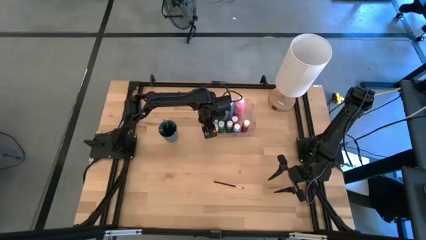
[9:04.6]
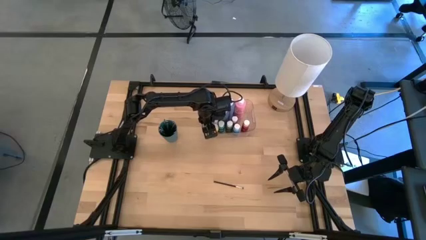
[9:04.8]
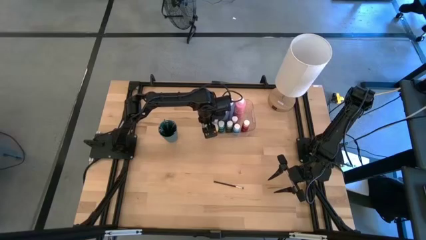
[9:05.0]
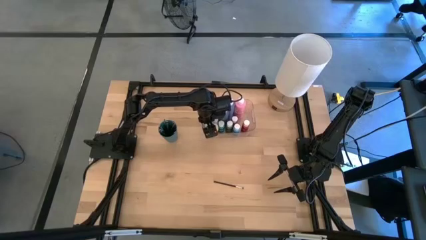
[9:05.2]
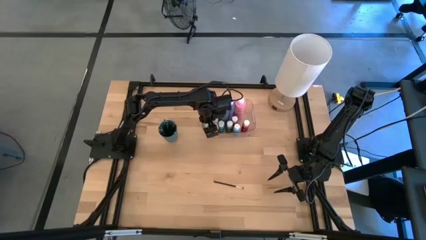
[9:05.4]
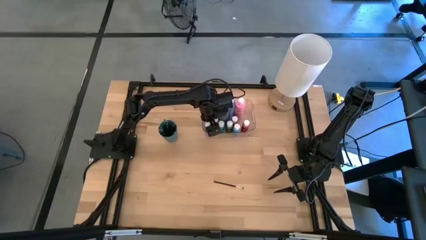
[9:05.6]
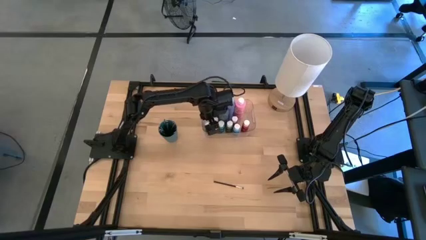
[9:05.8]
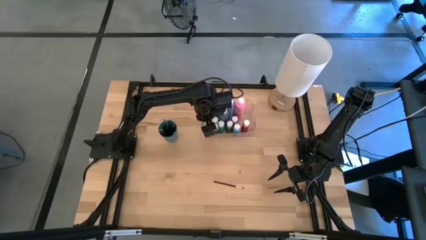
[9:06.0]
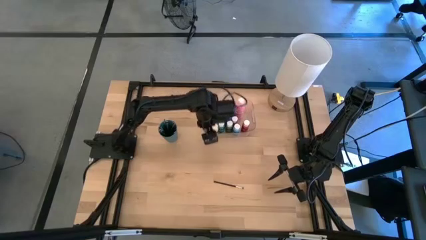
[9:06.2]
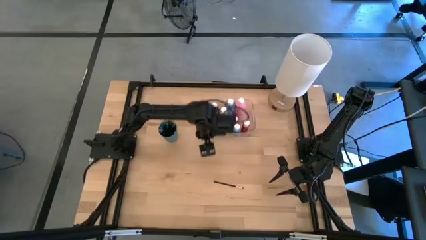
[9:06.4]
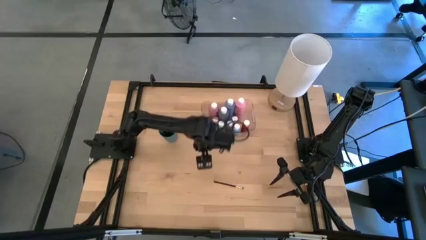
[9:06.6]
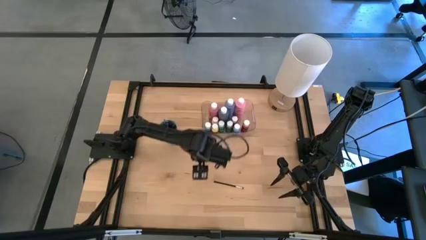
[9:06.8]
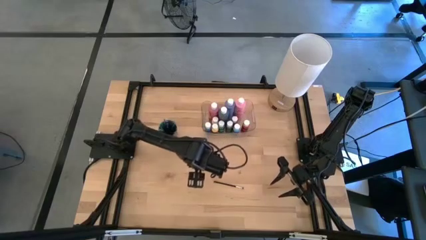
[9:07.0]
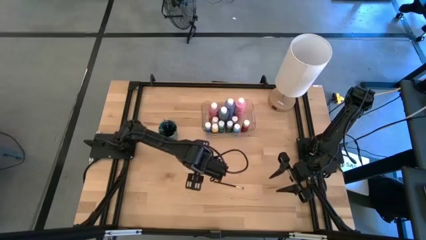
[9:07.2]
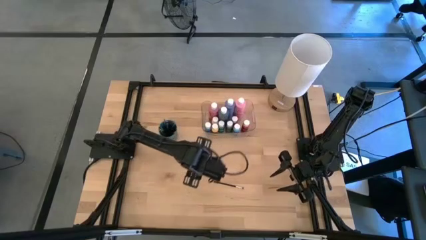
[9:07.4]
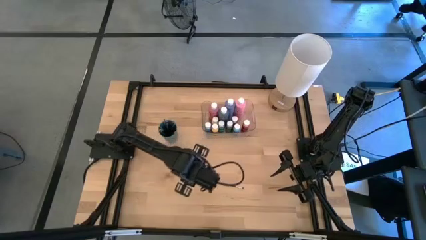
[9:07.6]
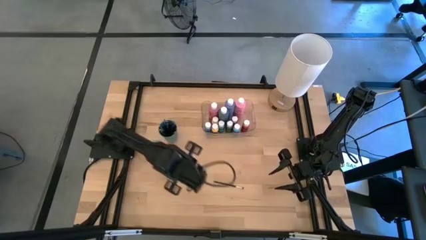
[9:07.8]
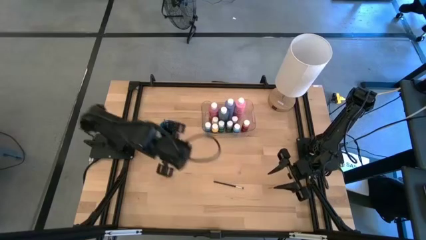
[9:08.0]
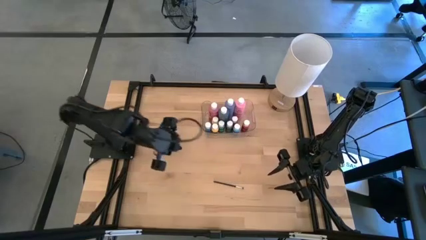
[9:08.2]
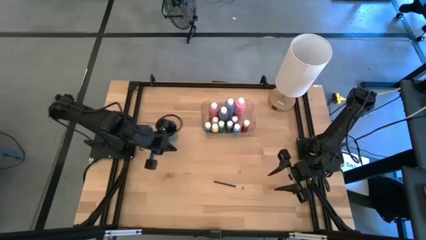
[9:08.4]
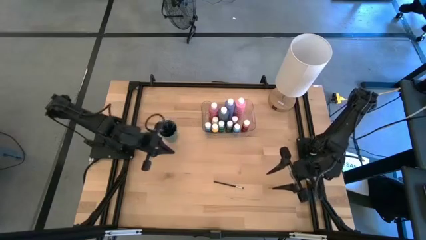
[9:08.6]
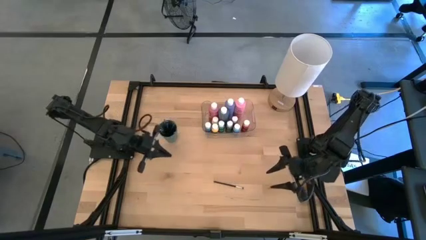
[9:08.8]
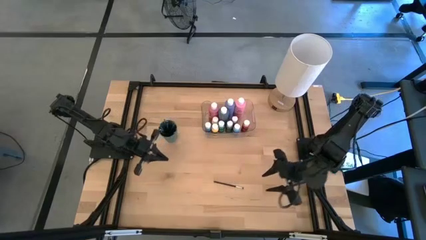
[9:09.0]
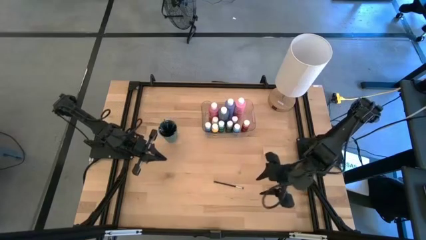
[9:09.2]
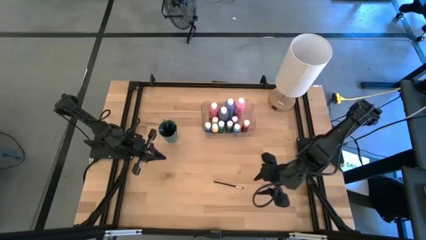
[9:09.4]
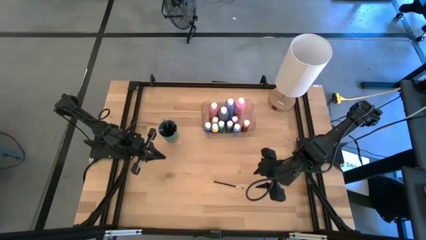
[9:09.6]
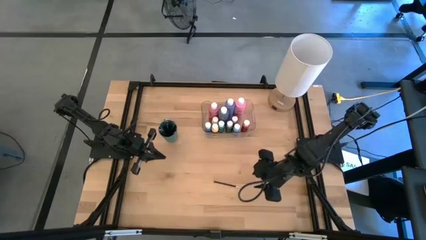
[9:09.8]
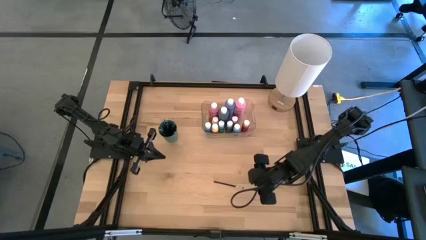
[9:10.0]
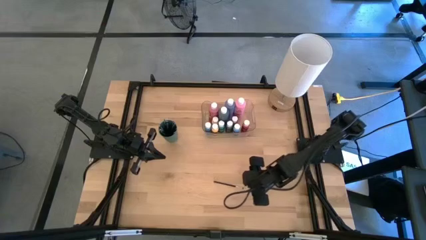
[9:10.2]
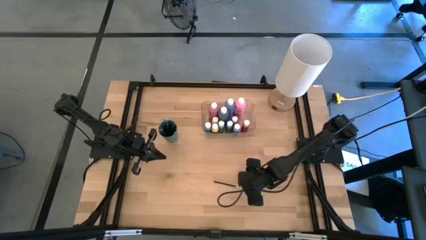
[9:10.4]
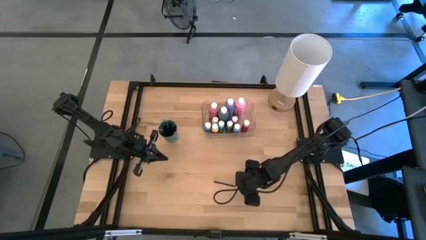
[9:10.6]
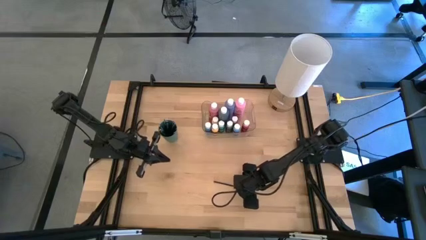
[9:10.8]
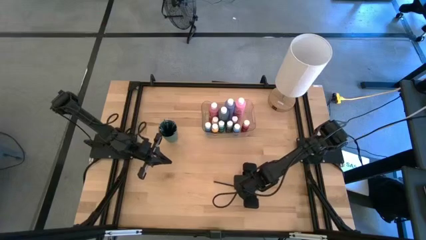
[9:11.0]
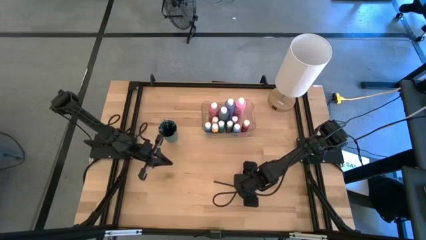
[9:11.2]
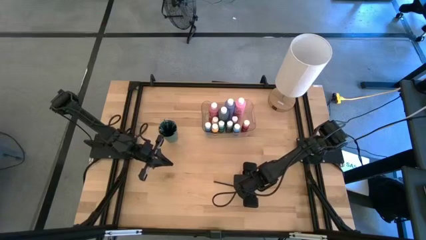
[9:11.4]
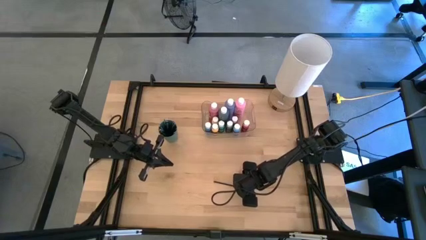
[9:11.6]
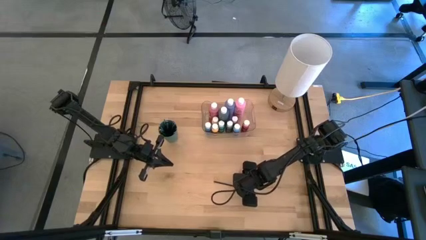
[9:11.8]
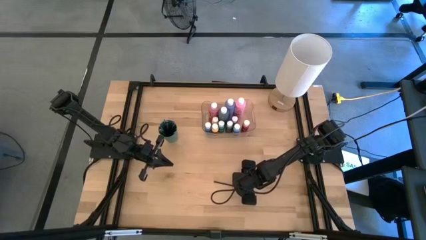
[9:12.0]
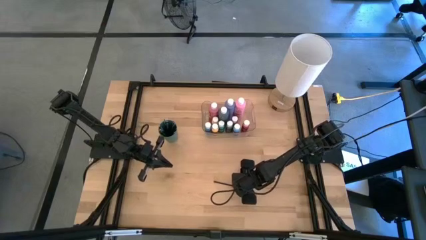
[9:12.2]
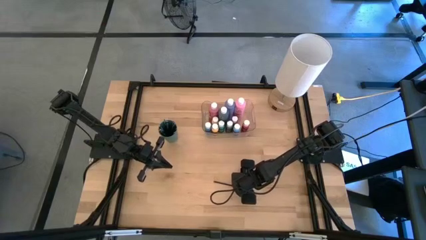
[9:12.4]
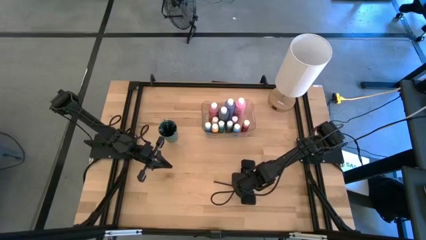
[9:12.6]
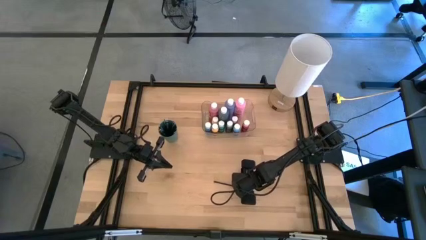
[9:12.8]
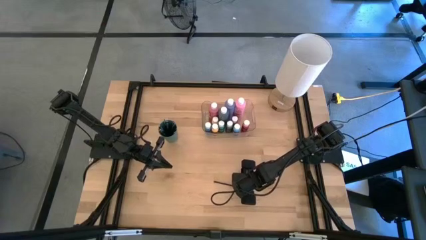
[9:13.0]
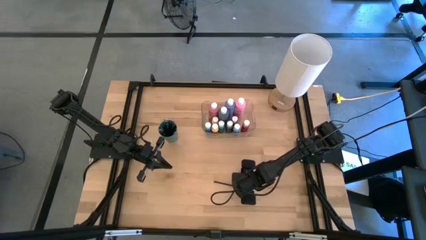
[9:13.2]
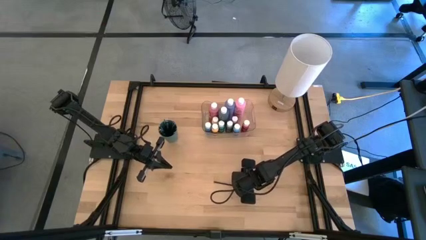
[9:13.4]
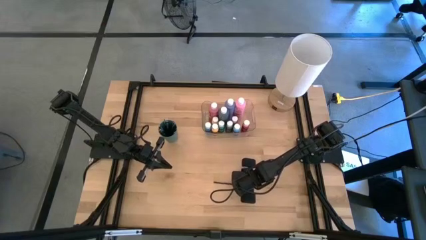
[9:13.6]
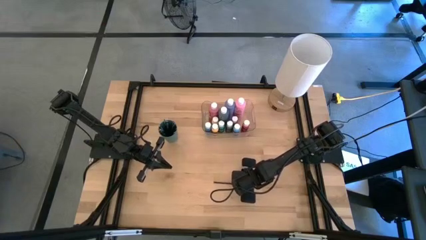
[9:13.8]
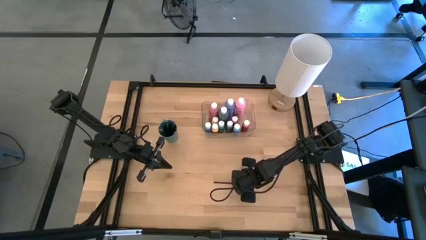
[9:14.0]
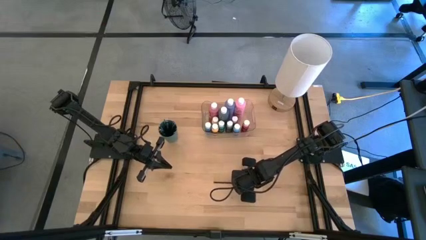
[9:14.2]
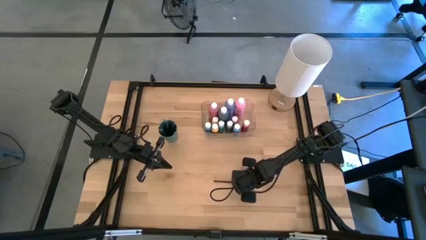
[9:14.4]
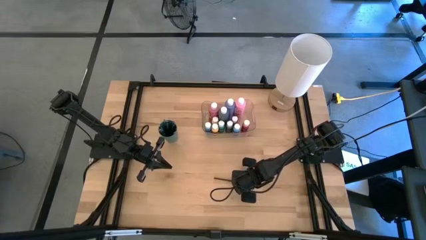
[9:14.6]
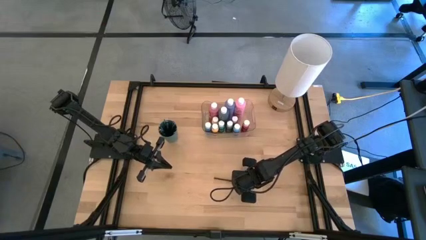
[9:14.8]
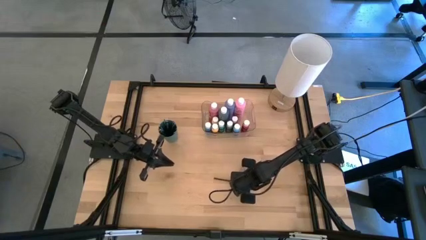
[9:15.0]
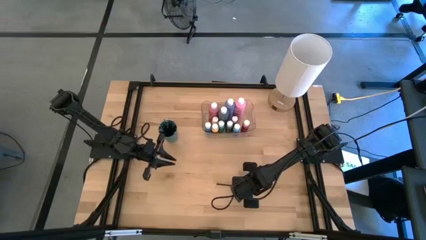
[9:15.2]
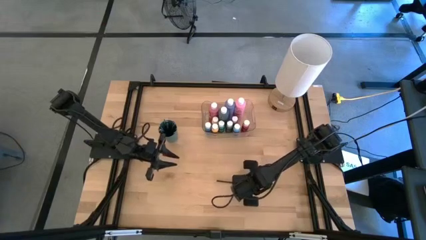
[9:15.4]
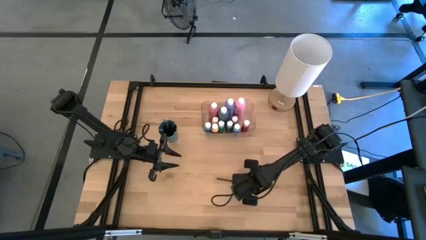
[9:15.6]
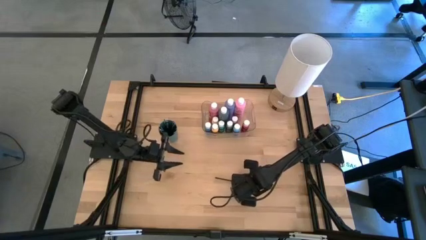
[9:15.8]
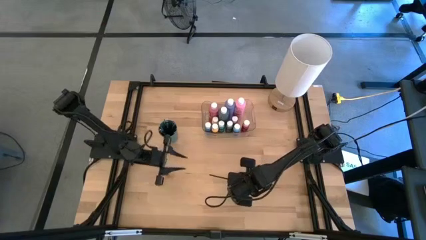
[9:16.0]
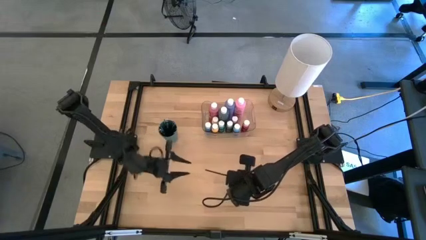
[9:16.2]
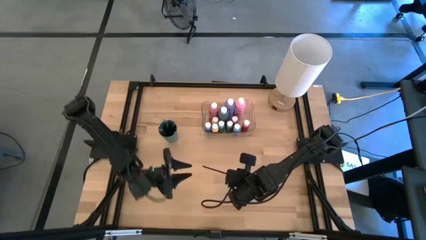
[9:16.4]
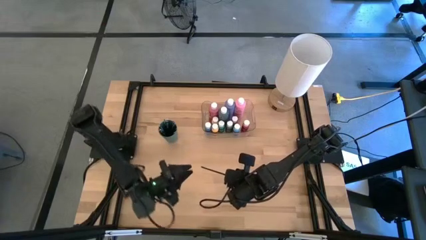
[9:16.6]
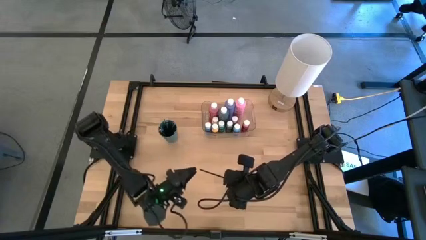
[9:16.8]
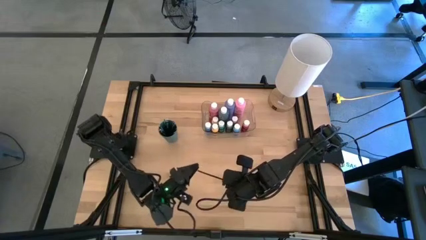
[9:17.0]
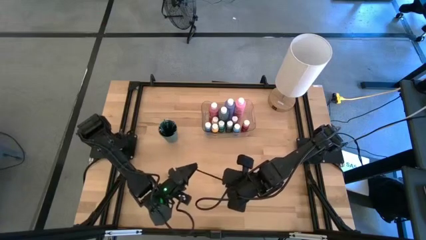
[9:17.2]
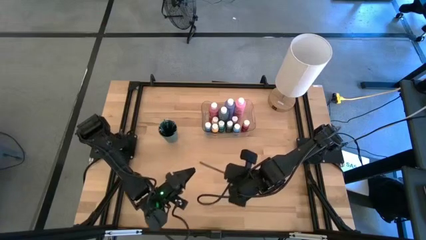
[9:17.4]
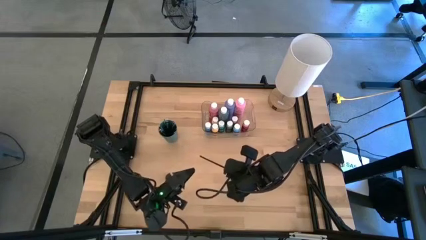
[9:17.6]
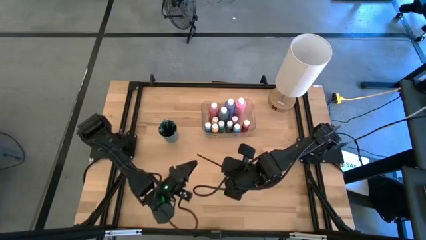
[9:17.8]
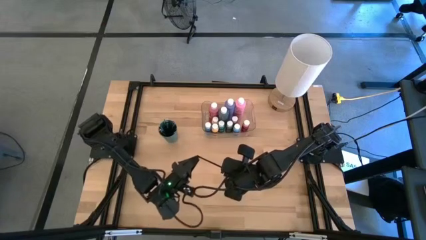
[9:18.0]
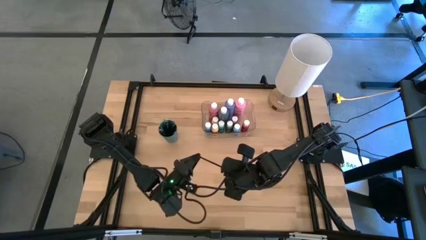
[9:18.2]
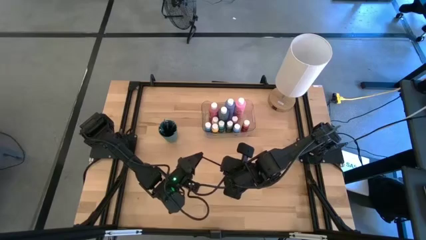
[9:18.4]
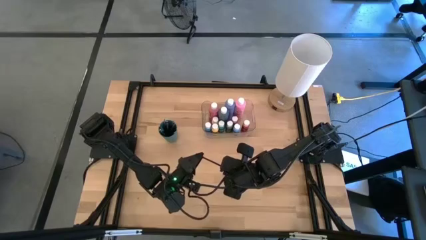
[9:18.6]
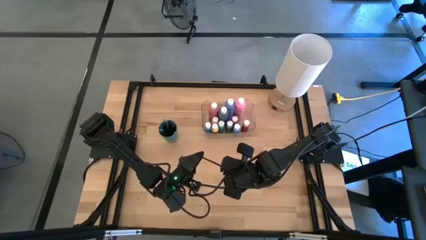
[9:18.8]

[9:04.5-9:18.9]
Task: Pick & Place Paint Supplies
Put the black paint brush into the green cup

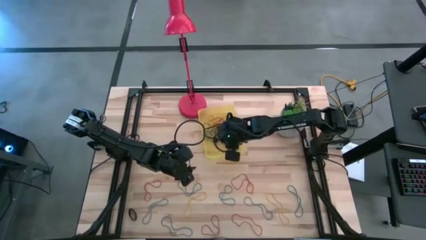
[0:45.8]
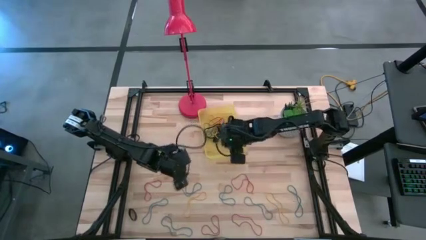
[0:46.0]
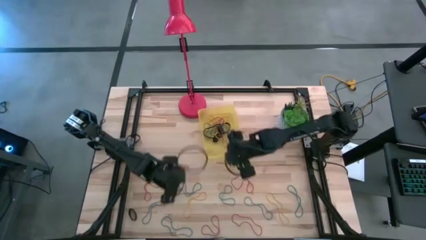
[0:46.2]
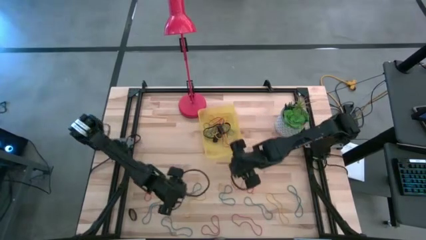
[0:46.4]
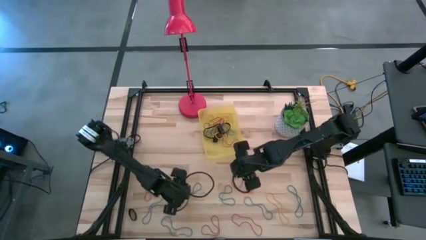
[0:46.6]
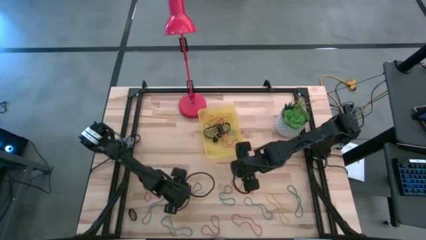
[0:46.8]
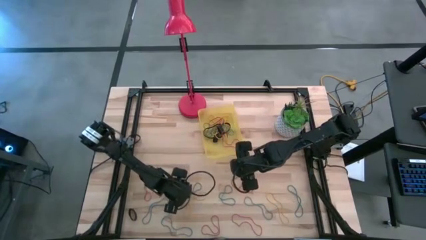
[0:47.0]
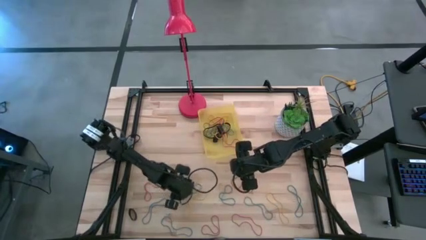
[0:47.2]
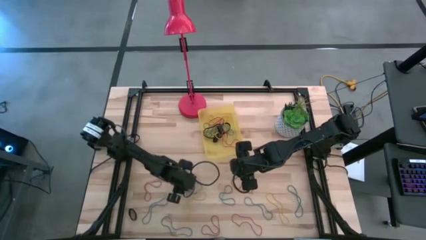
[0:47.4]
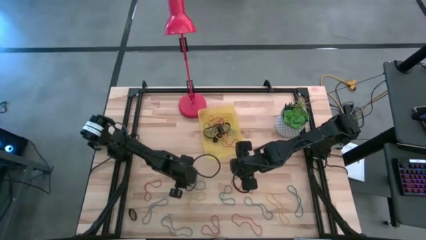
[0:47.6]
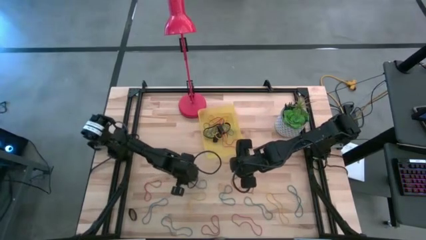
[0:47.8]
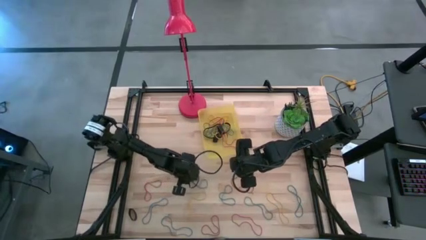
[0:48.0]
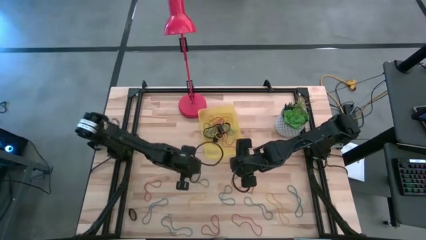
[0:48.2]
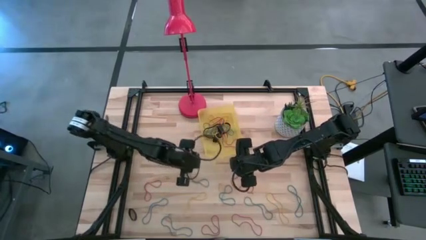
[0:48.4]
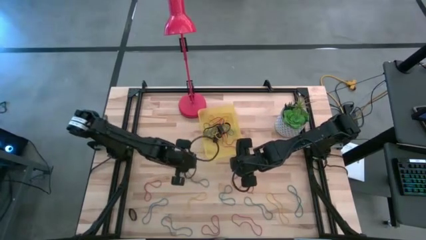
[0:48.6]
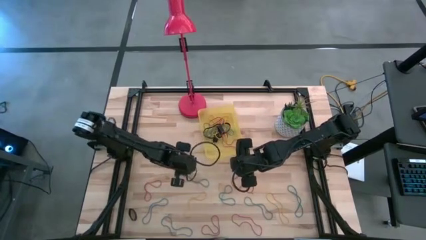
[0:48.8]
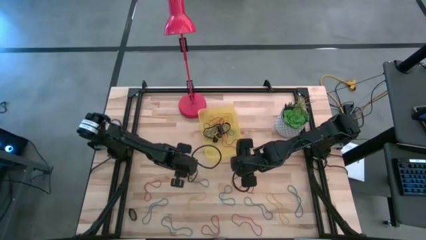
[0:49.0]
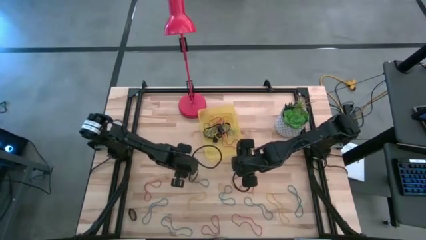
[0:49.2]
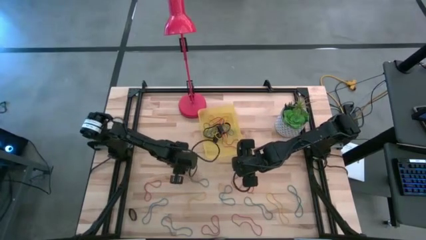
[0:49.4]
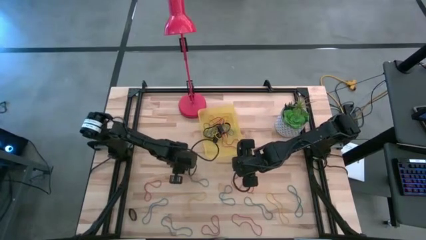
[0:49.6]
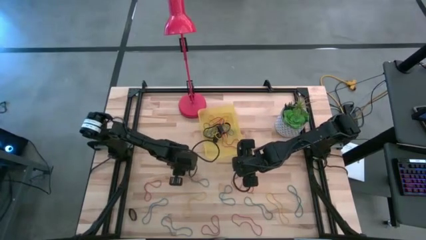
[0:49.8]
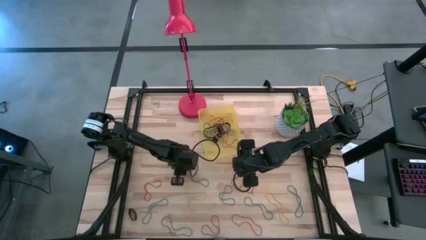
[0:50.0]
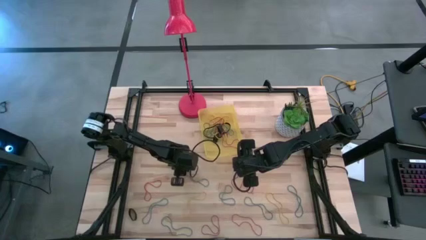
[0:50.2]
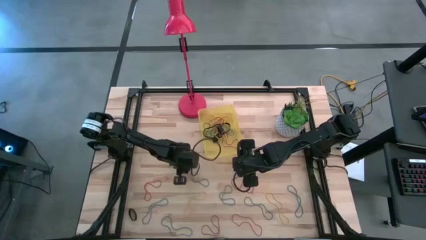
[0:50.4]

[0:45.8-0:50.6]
Task: Pick and place rubber bands into bin
Put the blue rubber band into the yellow bin
